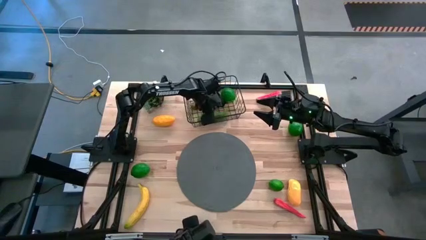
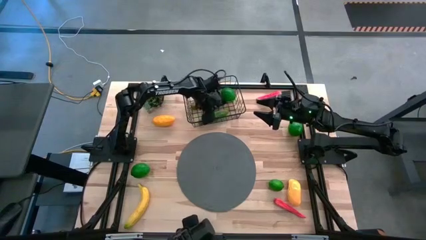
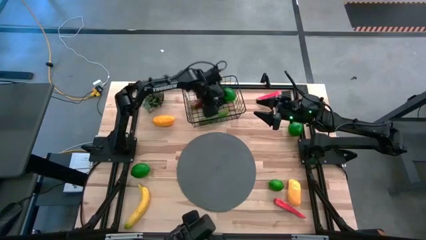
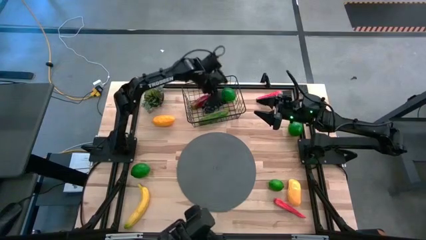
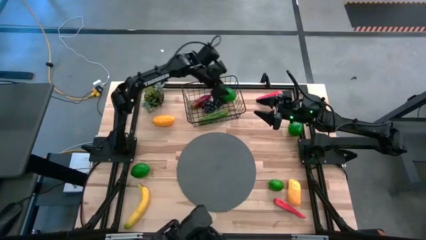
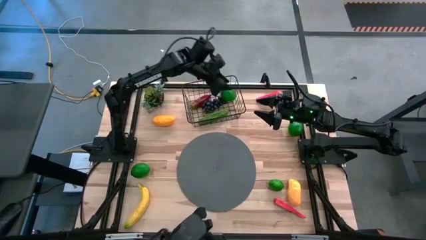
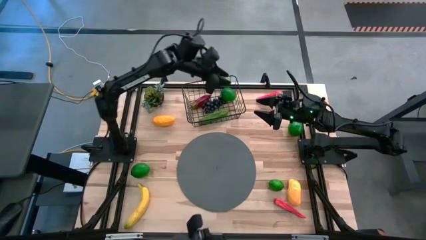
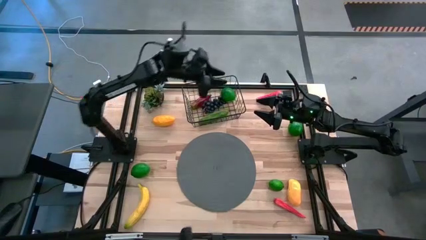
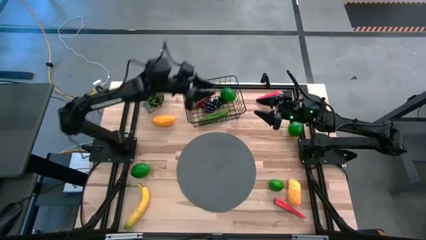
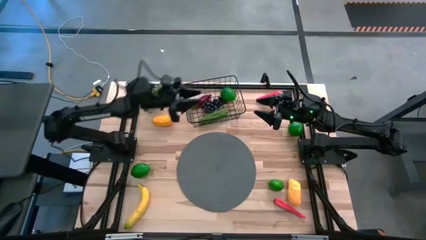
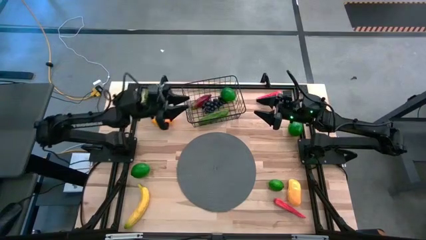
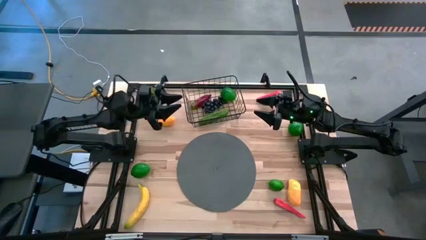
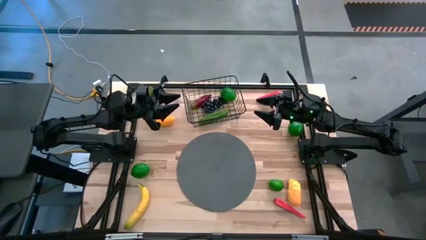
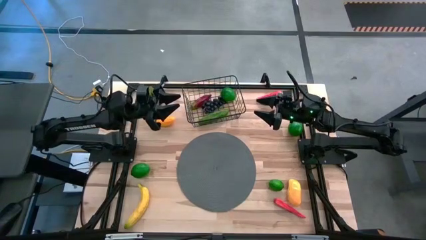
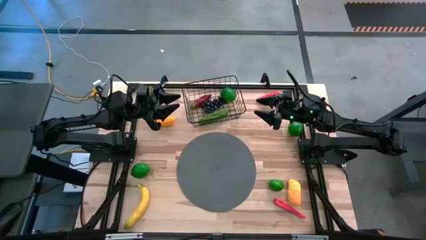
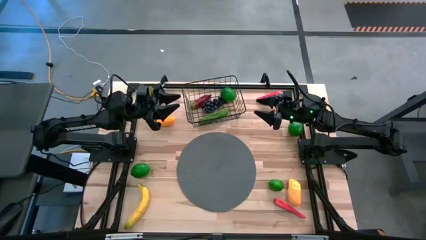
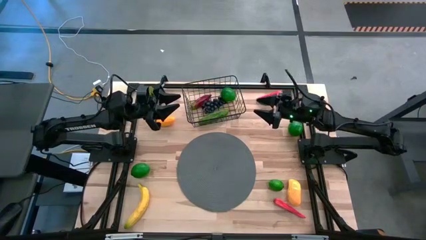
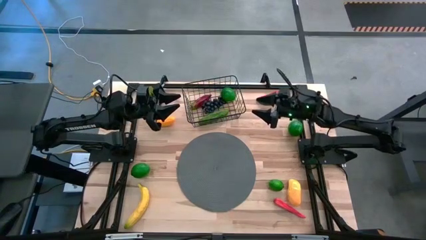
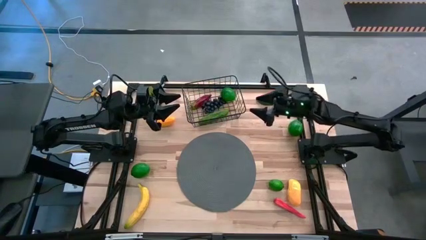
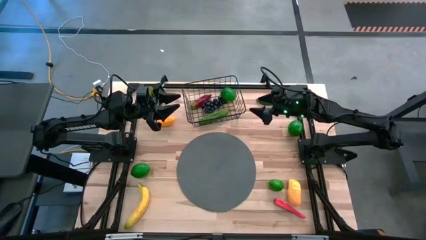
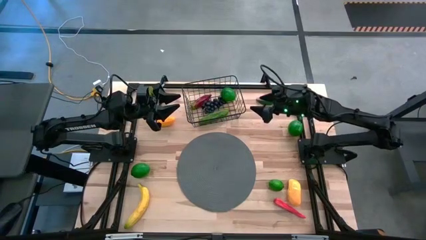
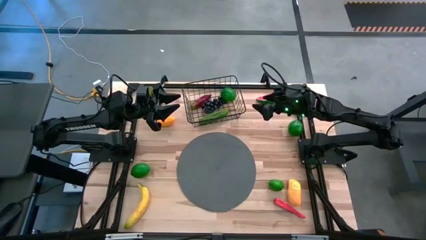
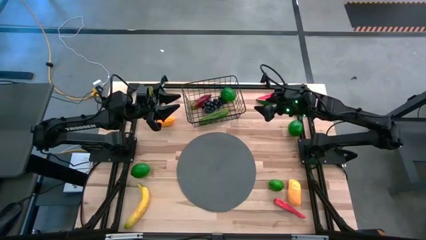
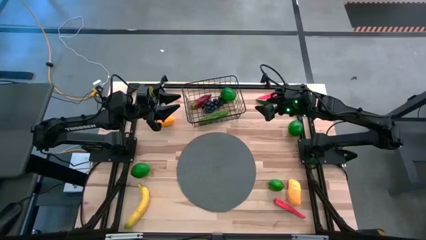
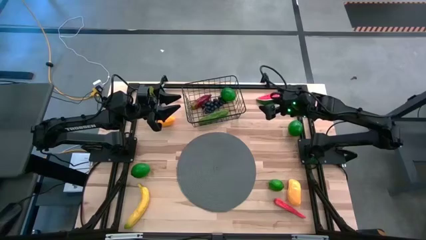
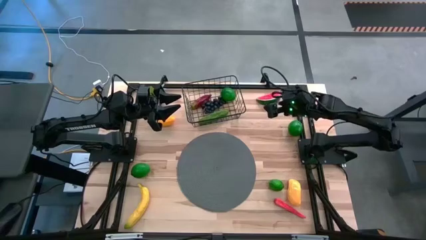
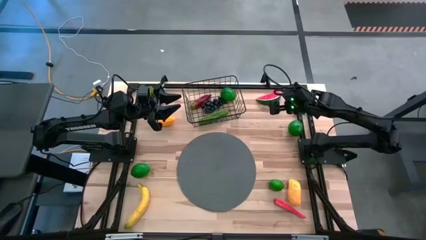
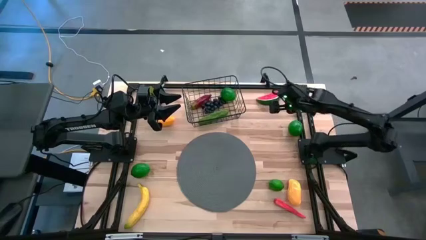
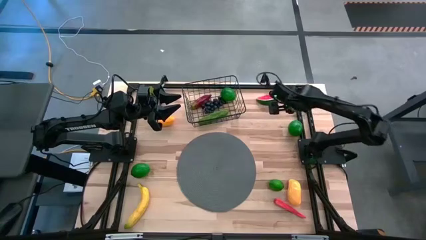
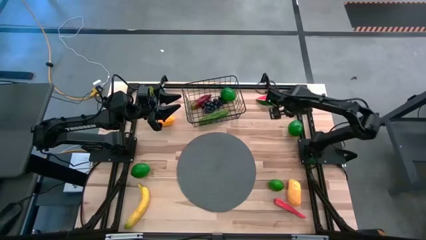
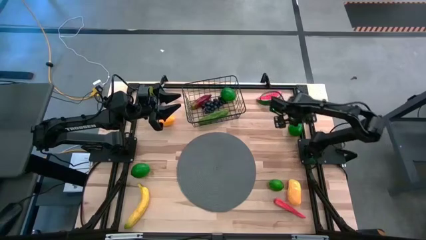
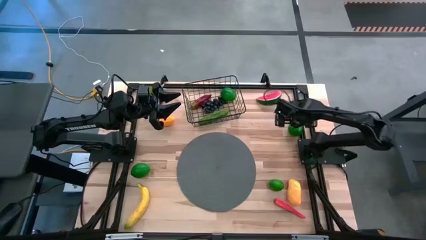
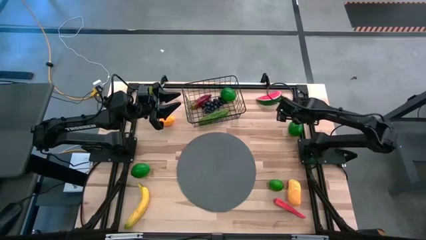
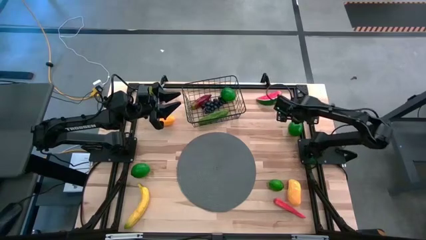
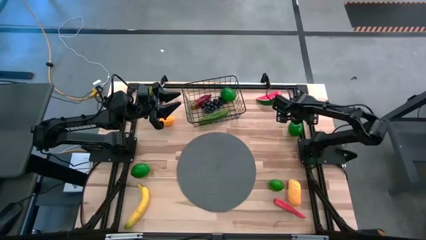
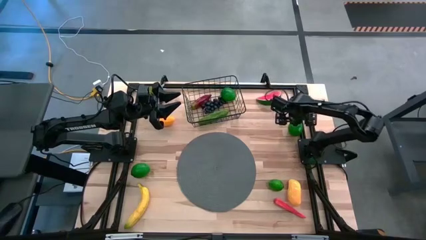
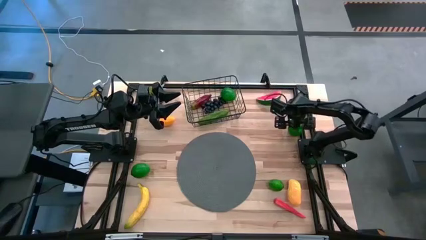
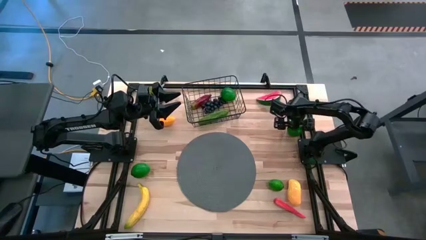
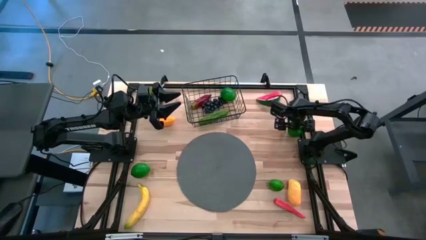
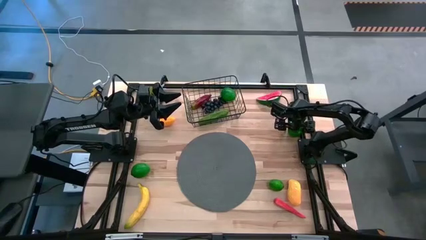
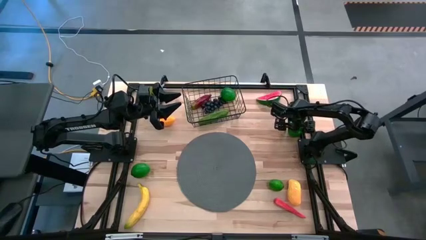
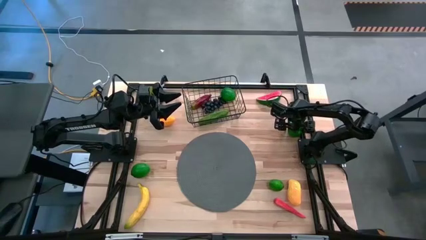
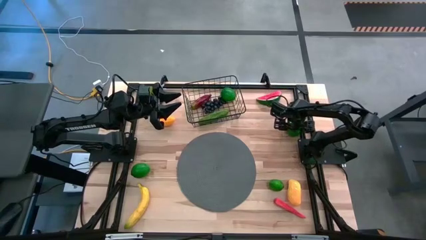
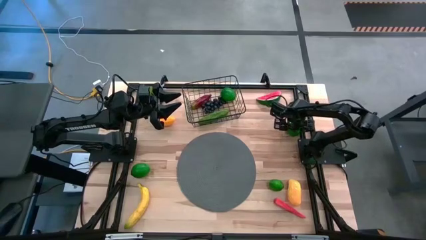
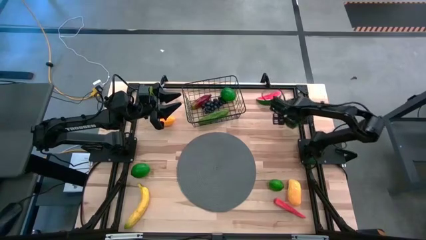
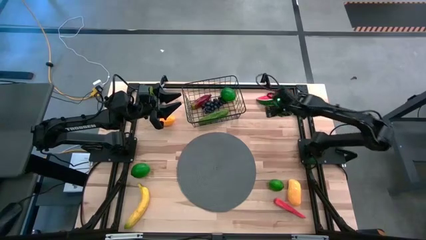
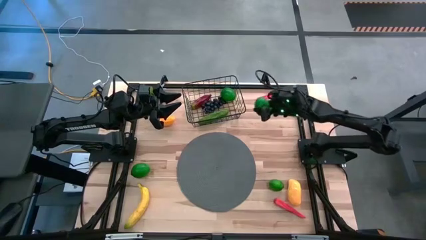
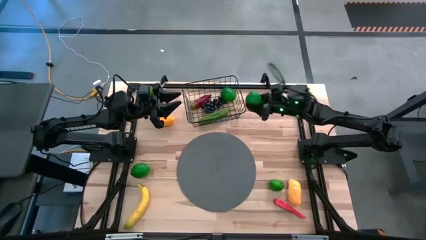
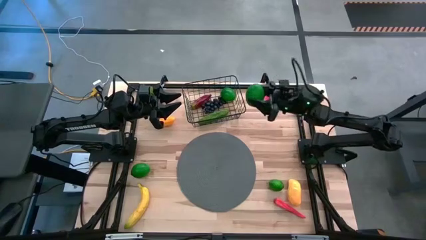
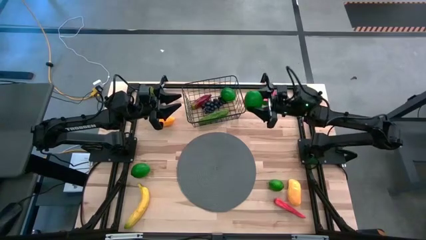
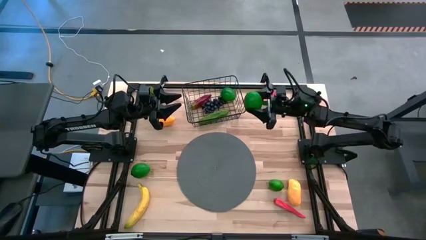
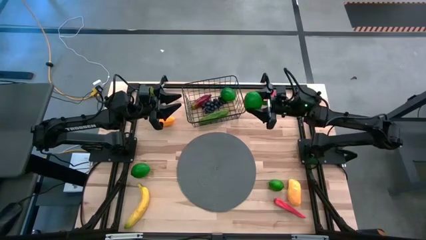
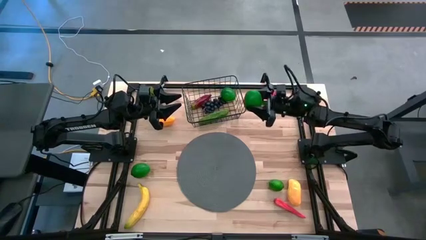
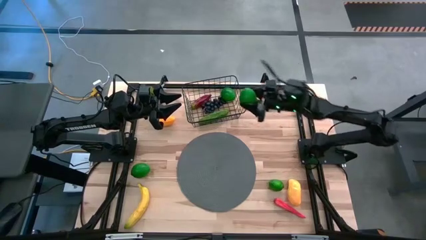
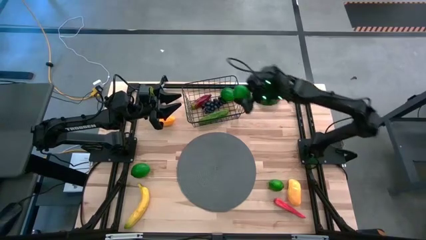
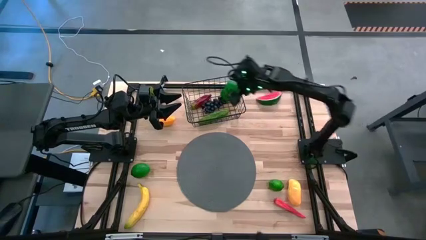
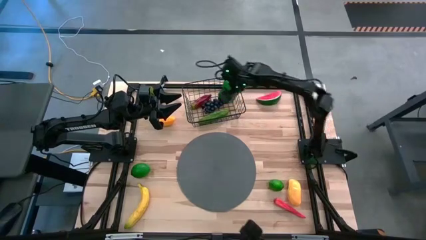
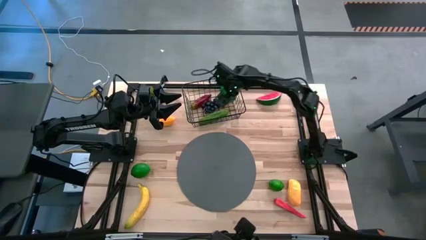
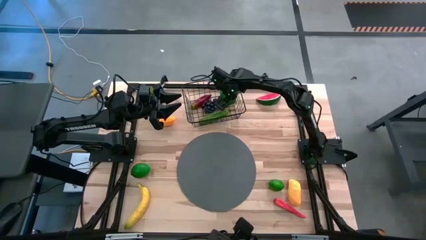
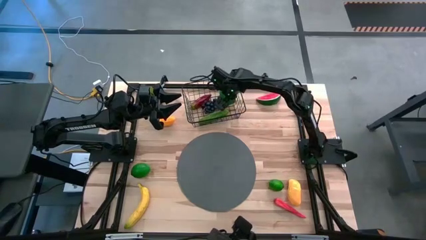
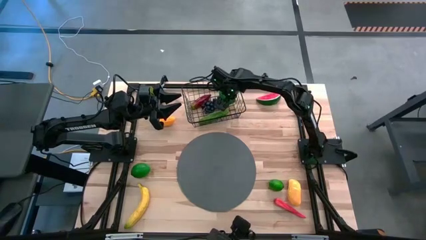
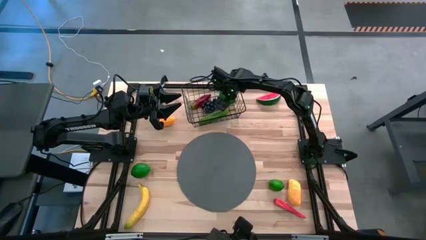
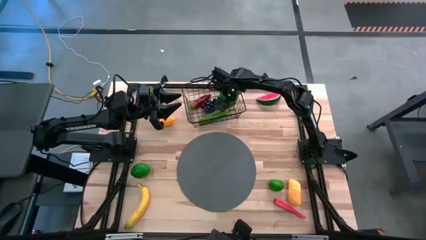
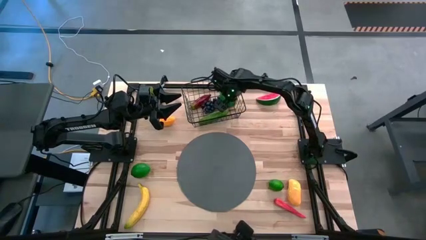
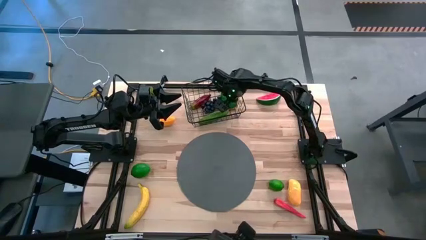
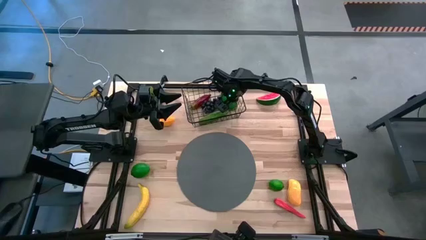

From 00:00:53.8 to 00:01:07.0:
Task: Build produce basket
Put the green lime into the black wire basket
